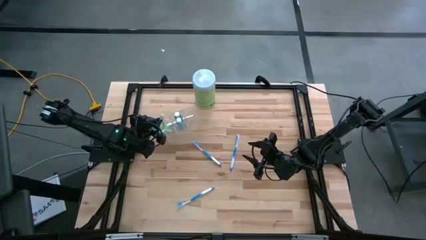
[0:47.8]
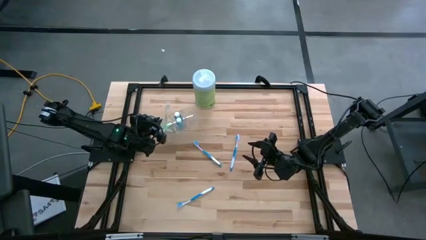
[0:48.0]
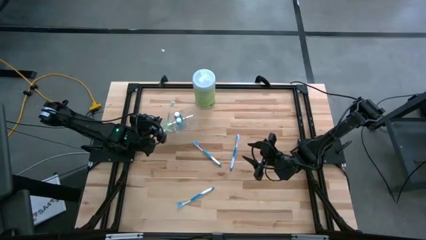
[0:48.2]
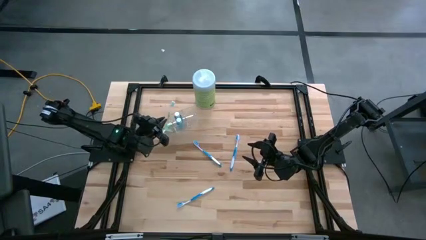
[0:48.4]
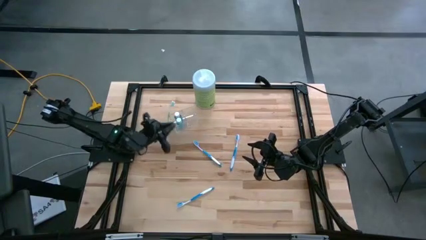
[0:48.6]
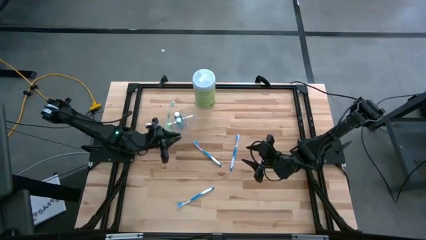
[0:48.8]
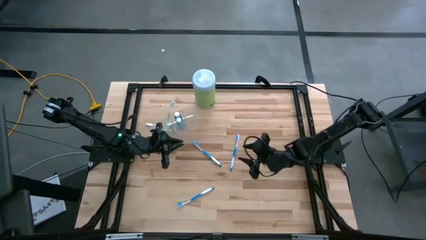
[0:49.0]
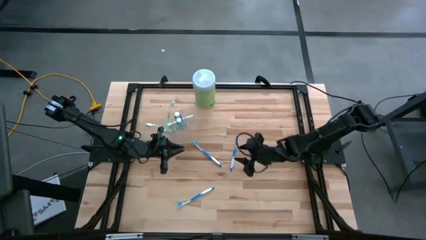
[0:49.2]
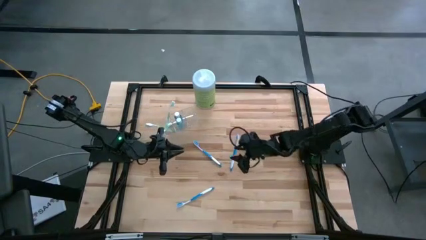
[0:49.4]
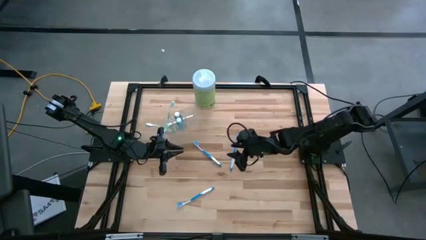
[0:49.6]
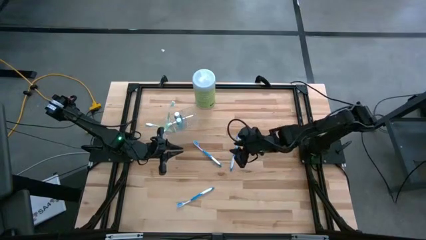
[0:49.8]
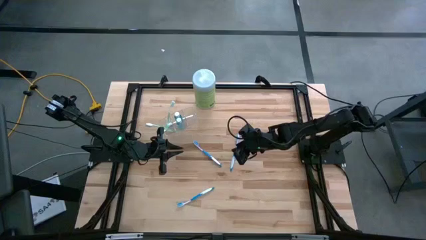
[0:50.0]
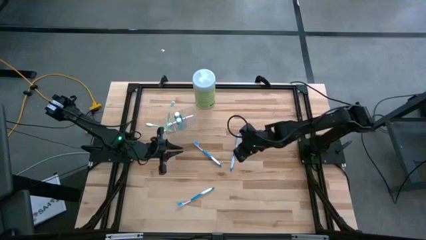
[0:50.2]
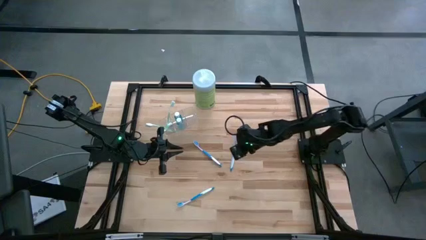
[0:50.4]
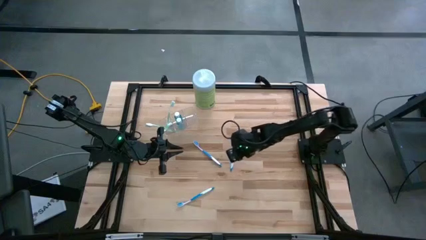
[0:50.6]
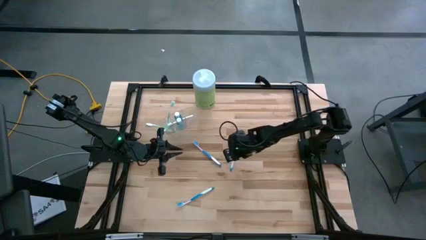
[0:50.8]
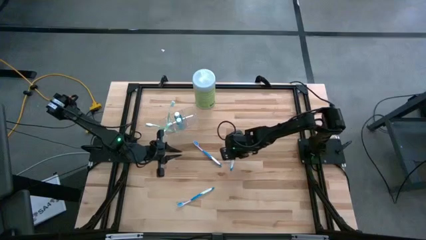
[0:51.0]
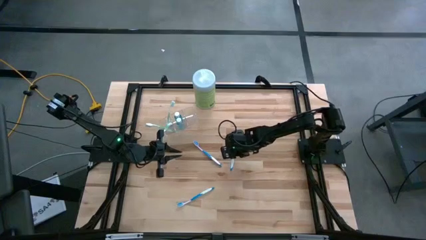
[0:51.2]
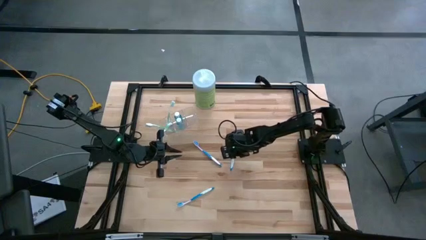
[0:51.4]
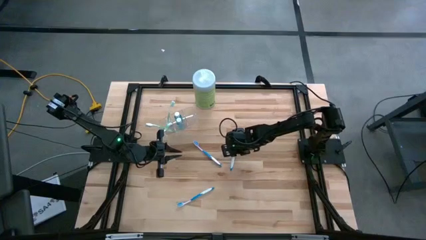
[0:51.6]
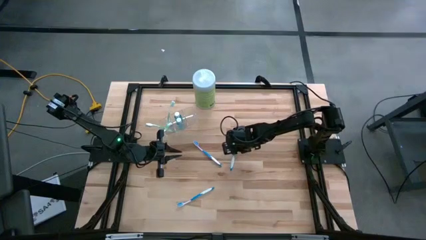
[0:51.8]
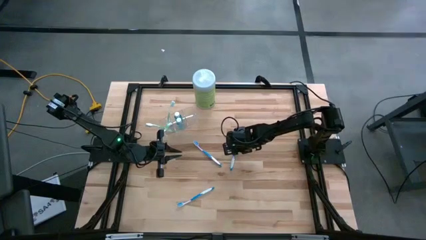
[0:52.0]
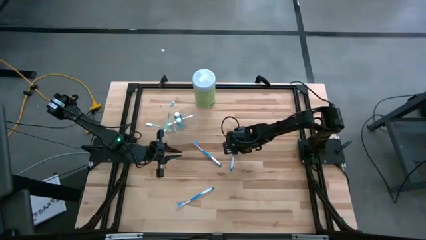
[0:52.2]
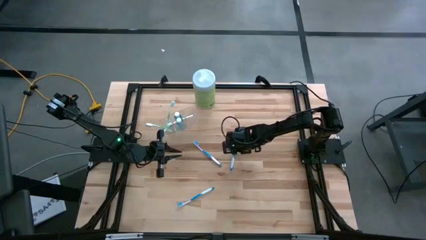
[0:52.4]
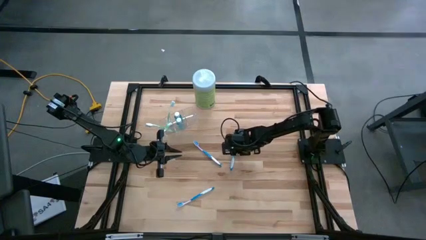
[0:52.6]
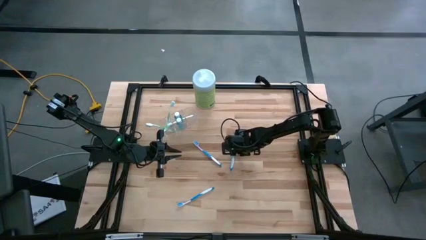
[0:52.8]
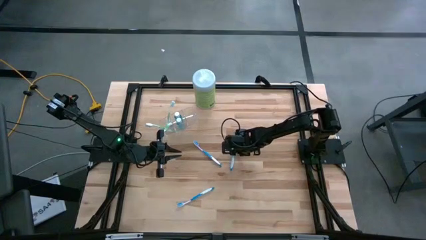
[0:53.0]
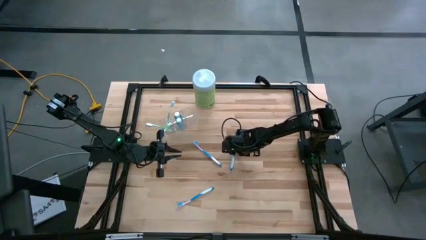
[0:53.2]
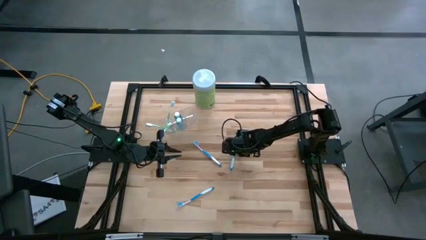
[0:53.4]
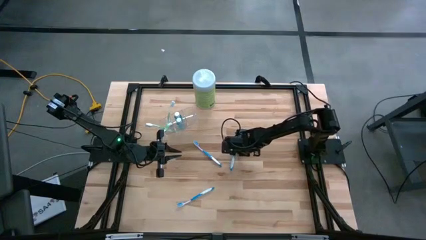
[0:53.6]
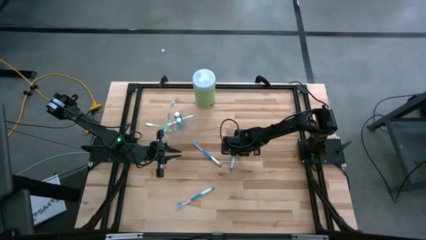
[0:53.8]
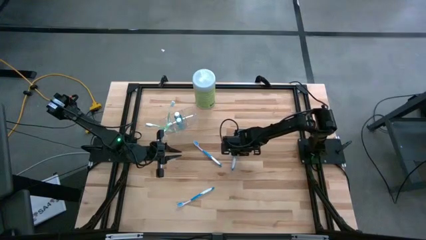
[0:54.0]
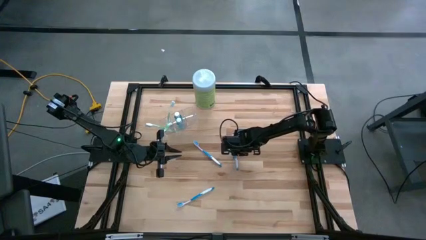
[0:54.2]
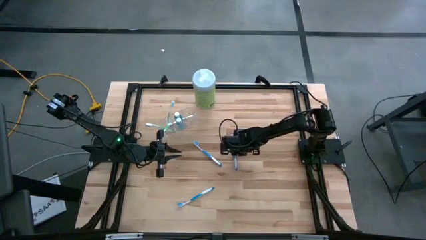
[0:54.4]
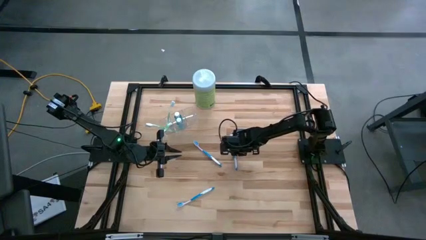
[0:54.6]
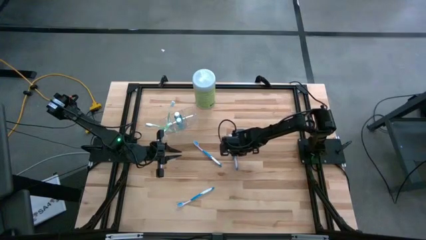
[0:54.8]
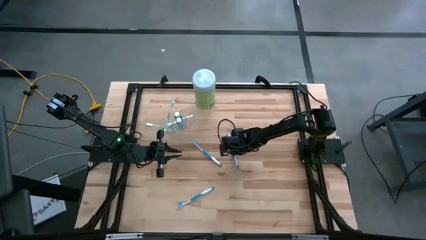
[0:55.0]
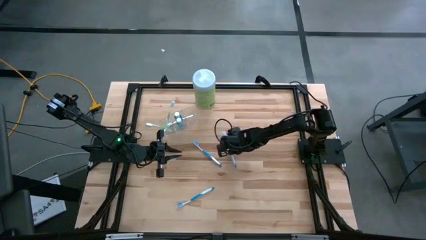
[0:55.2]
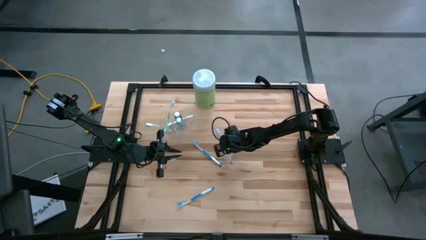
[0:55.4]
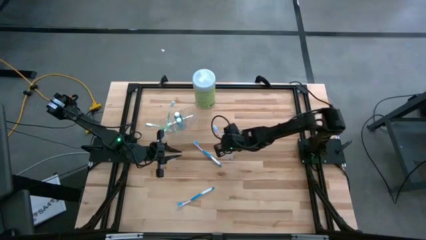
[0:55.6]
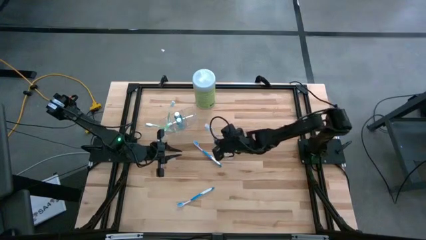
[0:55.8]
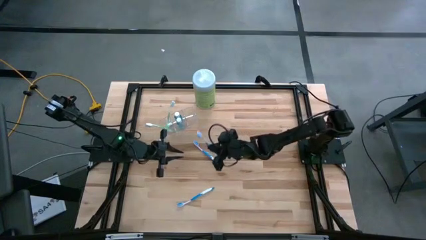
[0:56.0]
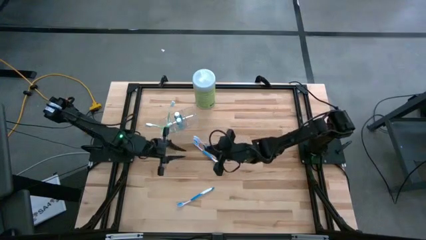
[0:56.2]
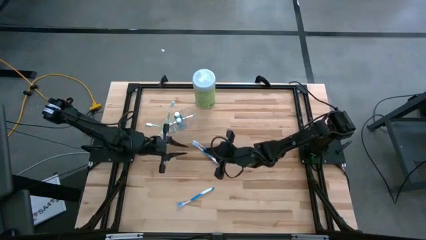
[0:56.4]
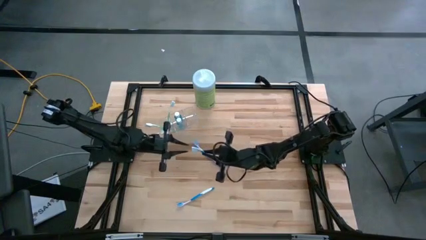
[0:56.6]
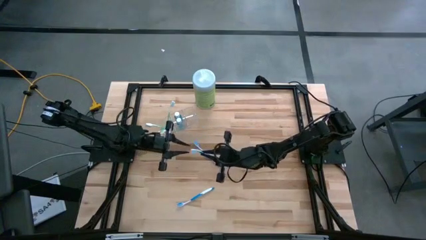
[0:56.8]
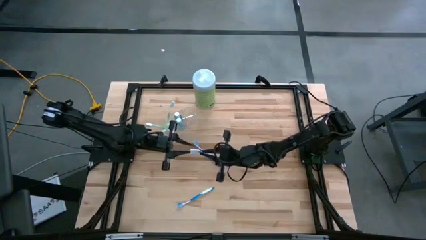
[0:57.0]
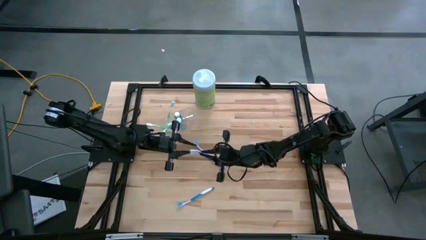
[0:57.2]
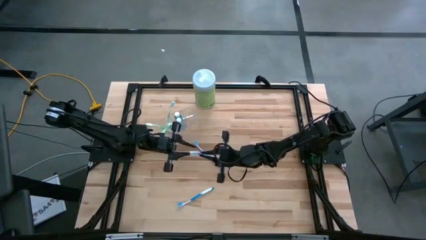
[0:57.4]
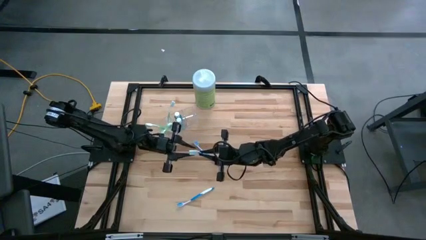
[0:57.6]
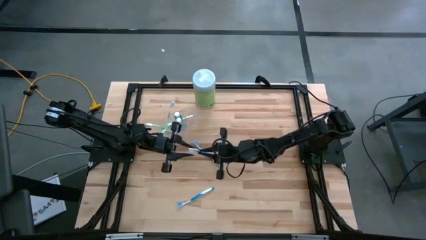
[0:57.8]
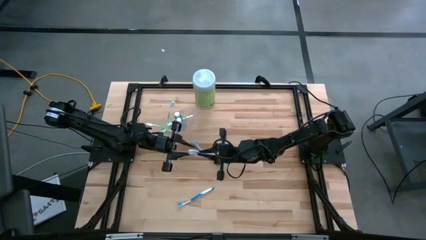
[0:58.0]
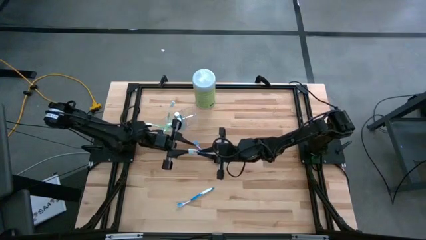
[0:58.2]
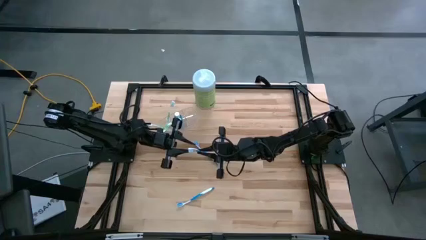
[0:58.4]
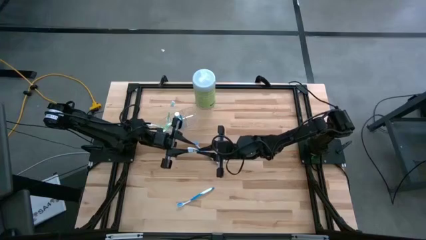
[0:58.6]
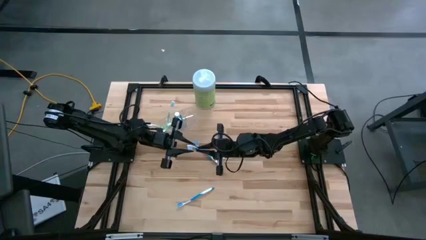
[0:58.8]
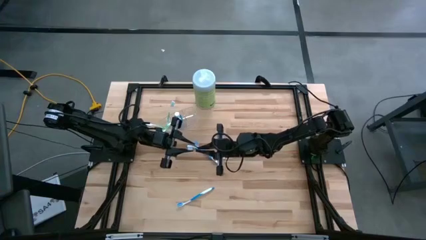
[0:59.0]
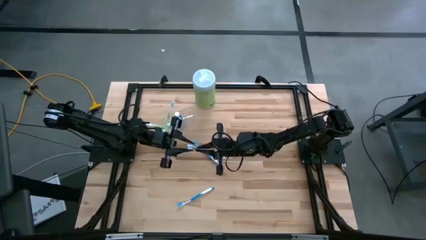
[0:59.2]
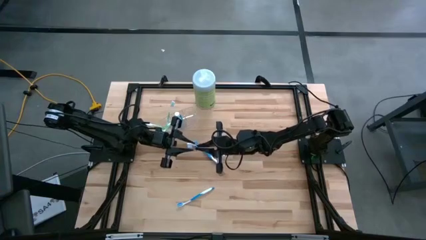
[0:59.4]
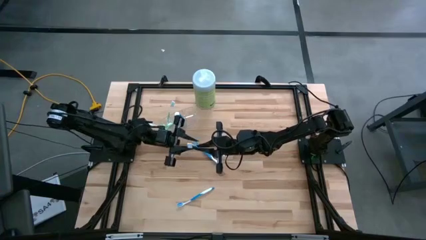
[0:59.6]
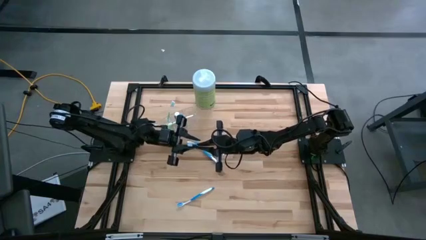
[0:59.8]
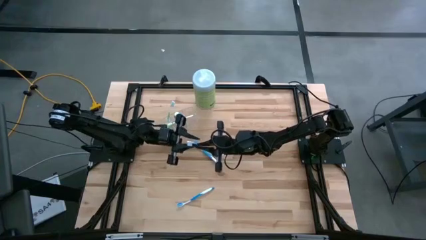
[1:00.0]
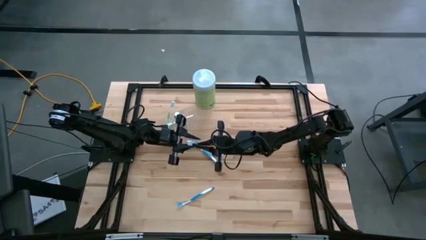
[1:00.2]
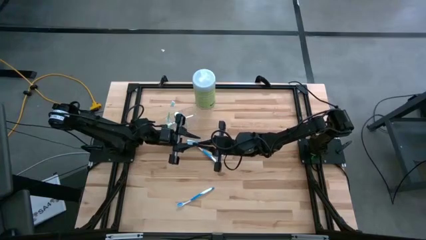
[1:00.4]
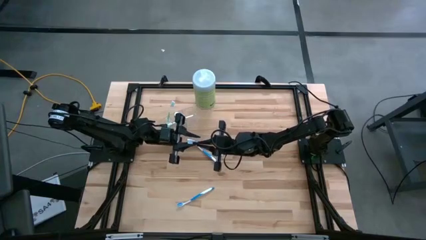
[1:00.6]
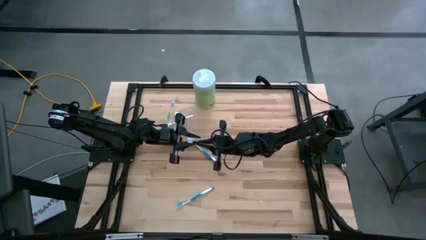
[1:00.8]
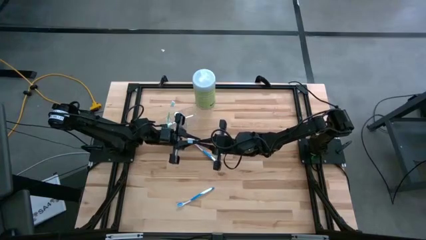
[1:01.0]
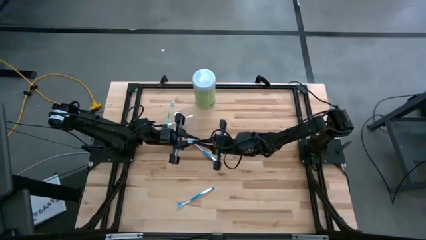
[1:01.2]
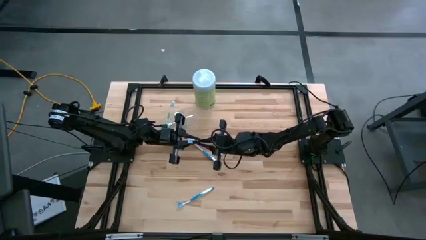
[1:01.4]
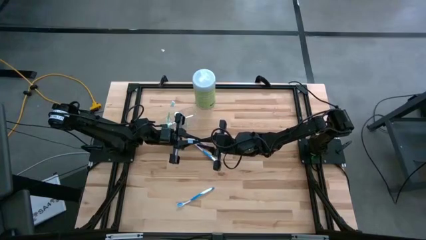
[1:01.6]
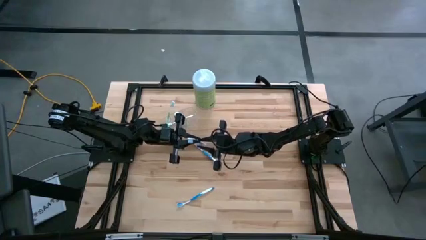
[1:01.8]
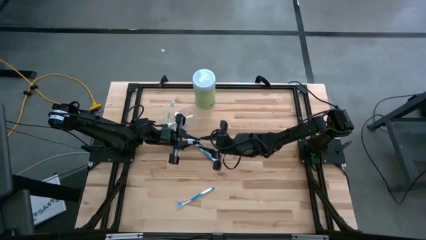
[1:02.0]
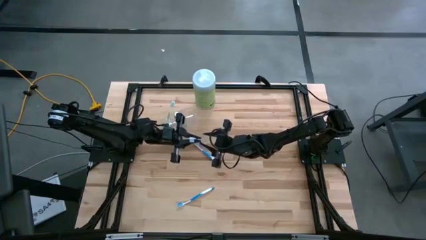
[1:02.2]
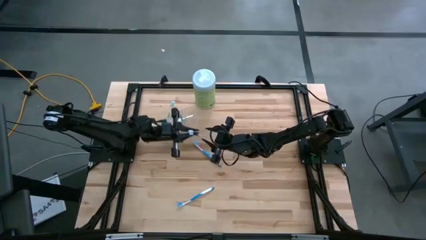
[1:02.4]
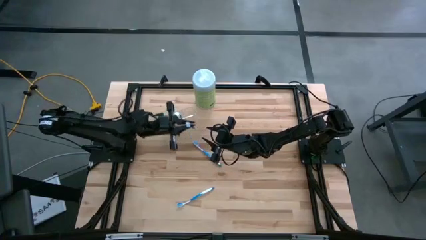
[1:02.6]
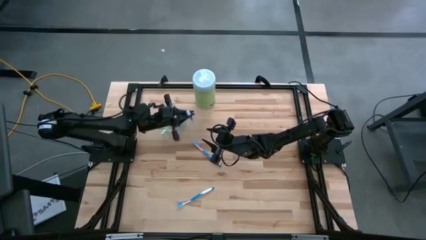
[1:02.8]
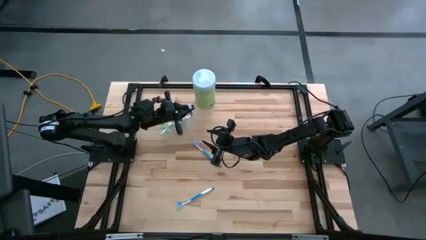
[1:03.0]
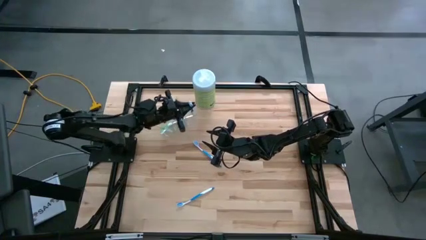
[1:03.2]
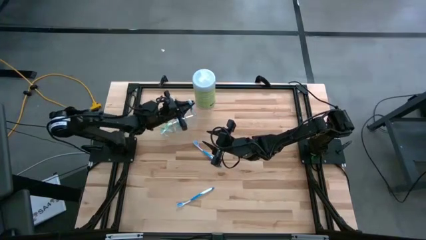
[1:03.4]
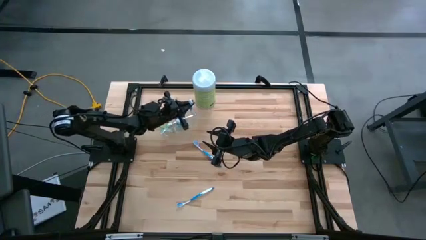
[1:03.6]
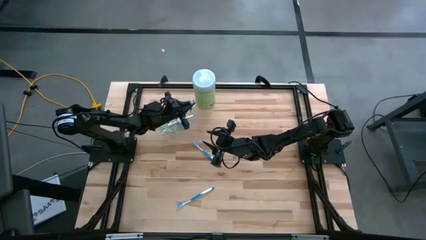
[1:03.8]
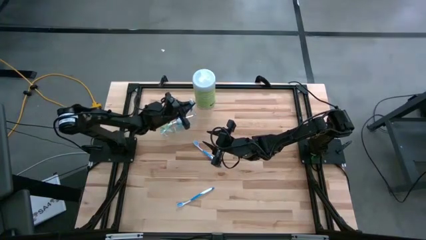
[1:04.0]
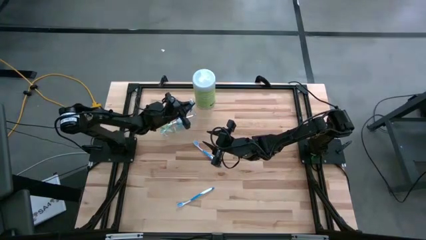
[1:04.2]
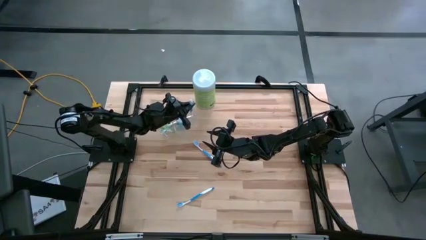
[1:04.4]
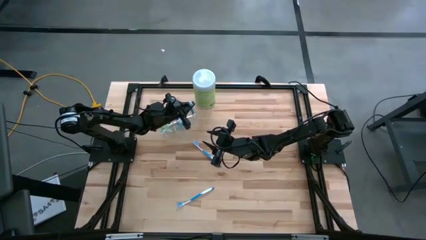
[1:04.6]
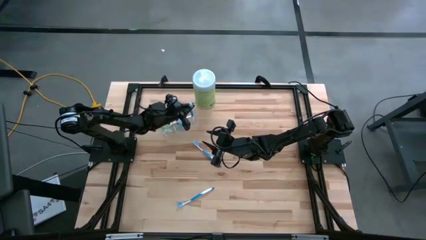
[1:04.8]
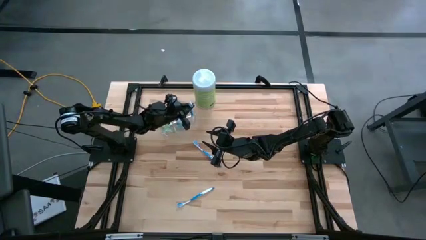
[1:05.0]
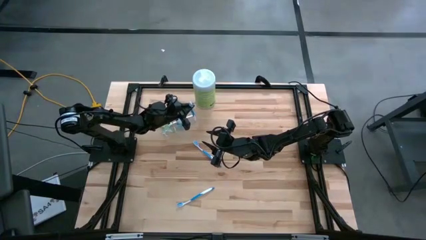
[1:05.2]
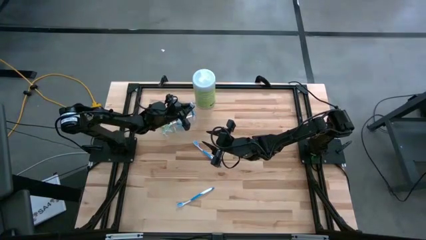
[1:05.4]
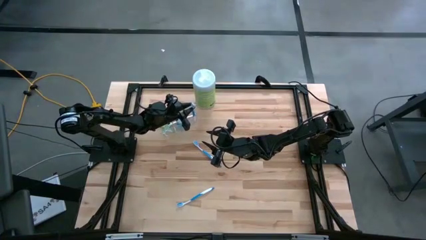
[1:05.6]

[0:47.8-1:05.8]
Task: Pick & Place toothbrushing station
Put the blue toothbrush into the transparent organizer
